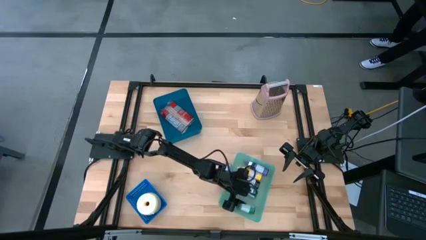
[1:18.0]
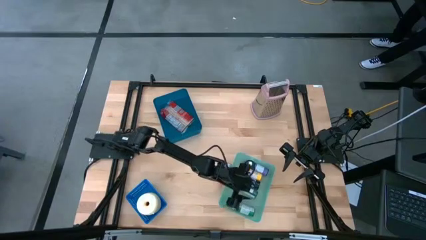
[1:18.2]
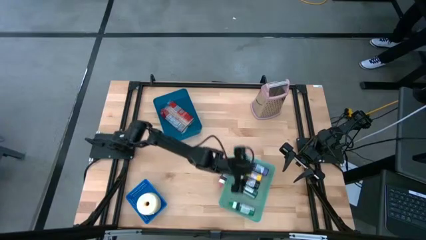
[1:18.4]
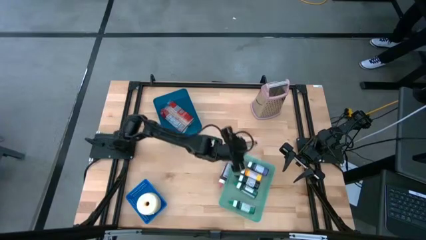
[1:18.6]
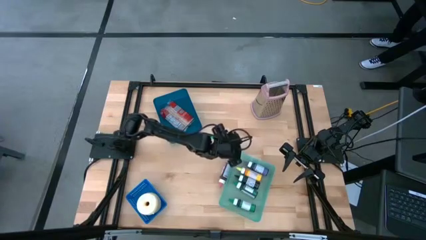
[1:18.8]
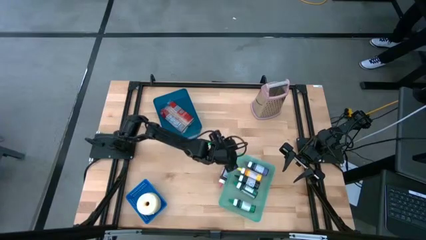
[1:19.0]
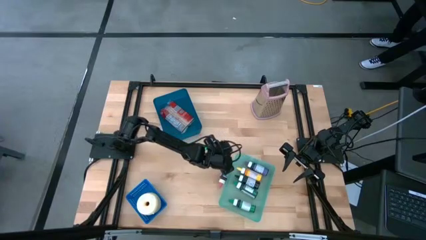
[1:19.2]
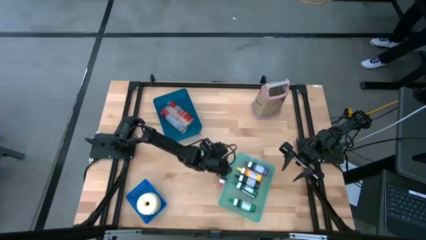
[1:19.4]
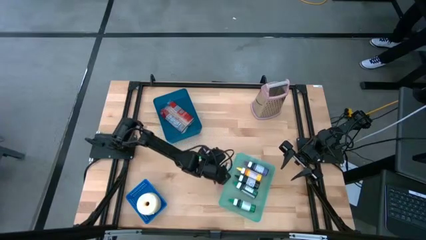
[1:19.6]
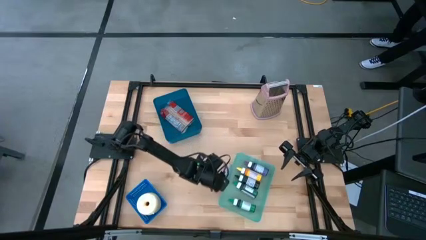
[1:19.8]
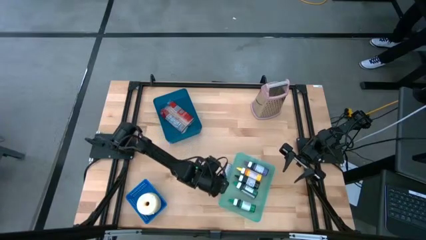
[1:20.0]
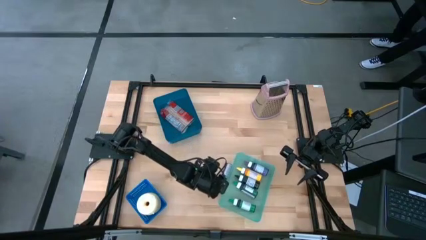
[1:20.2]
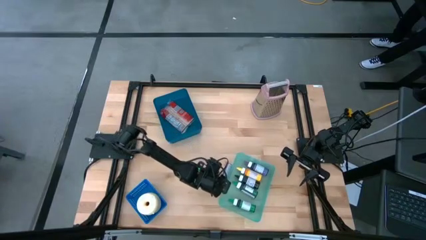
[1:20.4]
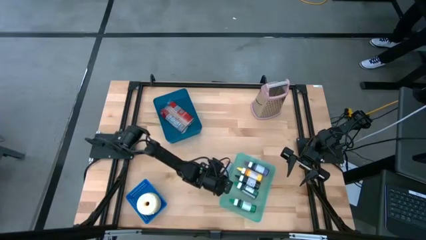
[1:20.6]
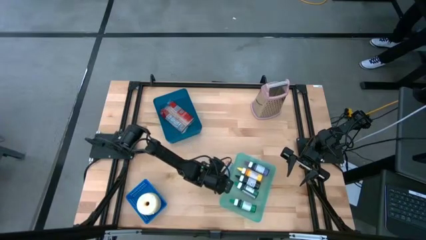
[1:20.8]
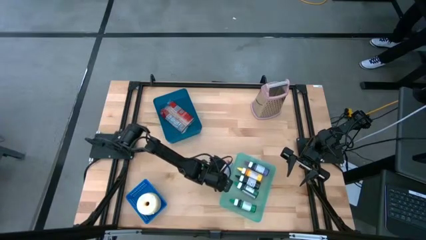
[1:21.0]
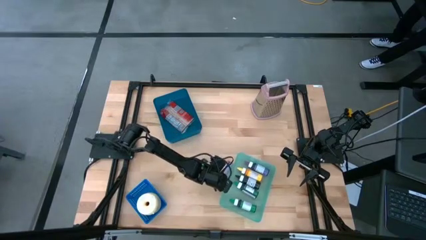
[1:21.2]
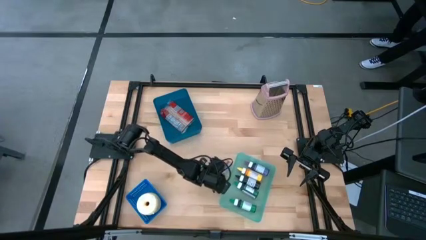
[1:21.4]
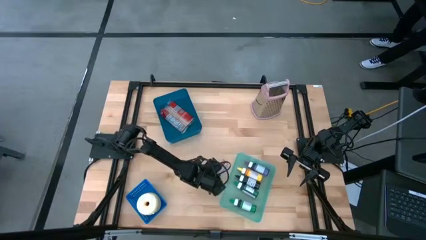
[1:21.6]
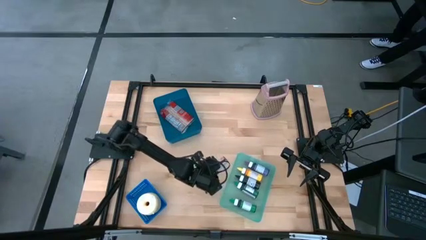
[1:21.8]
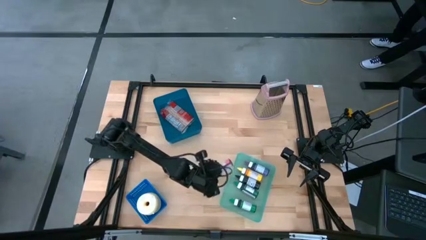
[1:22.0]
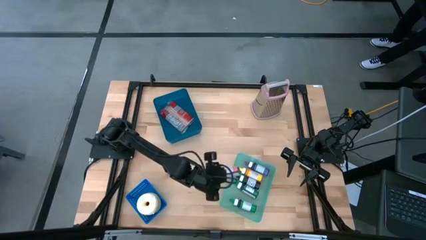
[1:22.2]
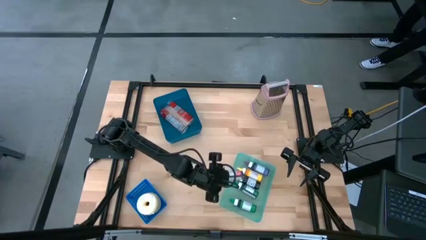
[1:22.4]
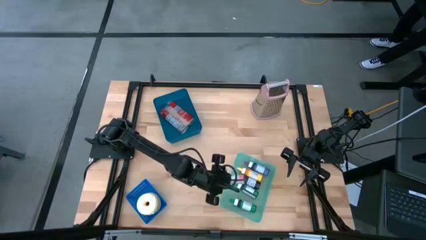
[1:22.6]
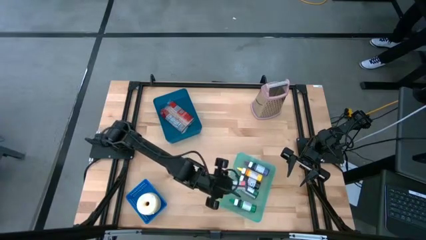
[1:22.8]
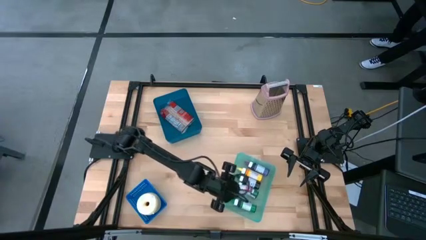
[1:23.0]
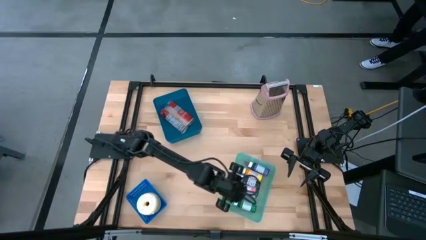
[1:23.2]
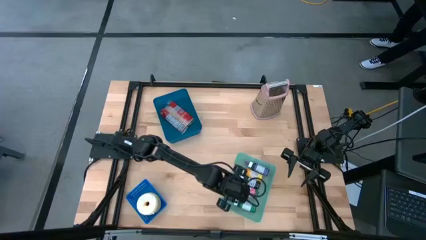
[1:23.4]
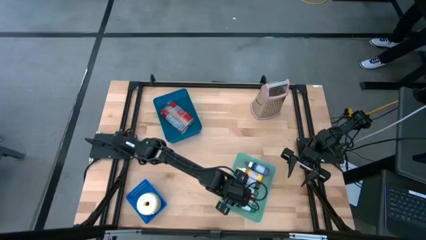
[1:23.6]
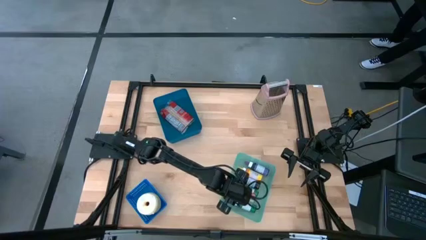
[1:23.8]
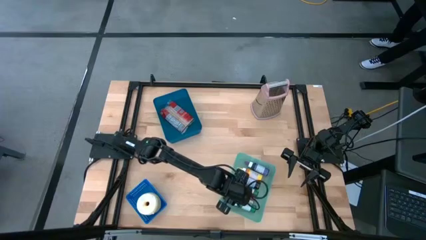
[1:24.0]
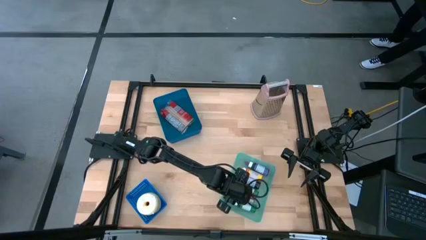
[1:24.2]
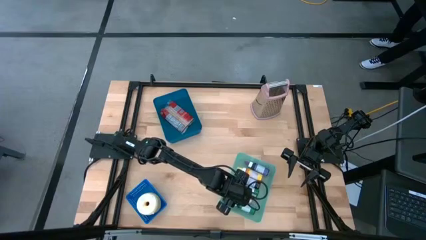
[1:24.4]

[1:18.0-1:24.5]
Put the pink food coloring bottle into the green bin

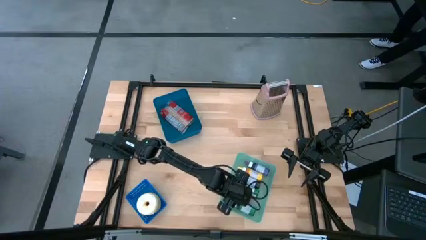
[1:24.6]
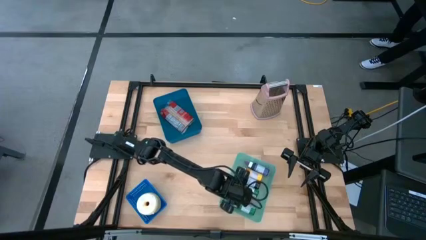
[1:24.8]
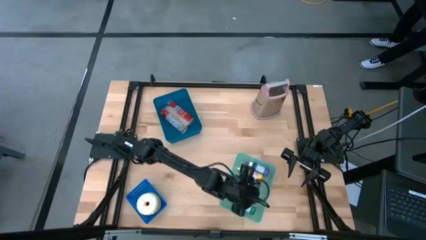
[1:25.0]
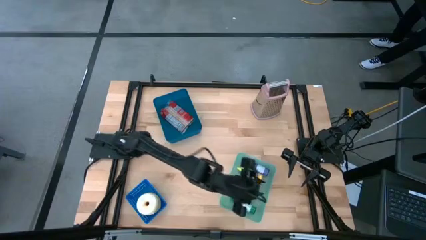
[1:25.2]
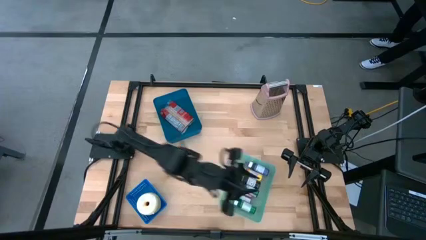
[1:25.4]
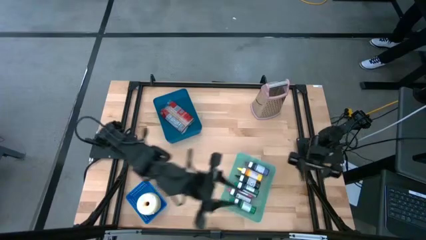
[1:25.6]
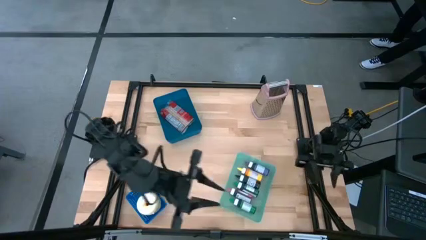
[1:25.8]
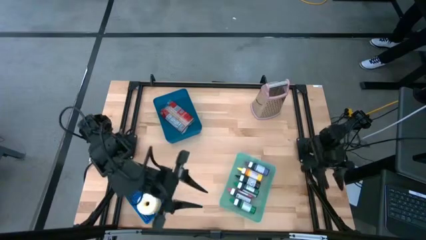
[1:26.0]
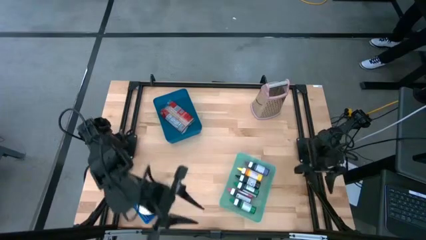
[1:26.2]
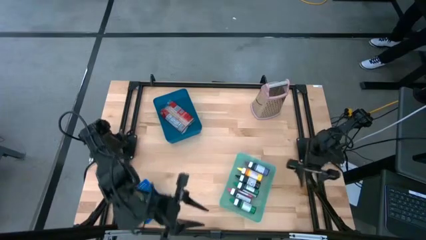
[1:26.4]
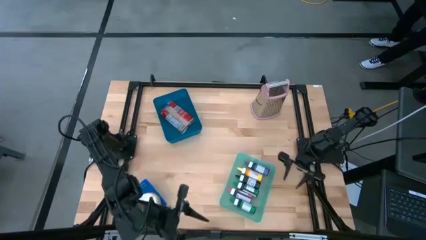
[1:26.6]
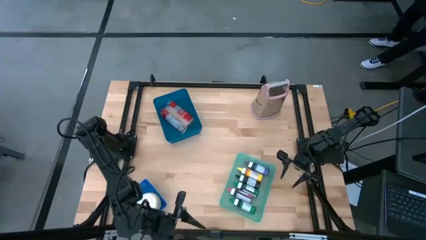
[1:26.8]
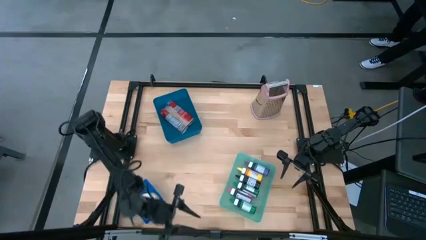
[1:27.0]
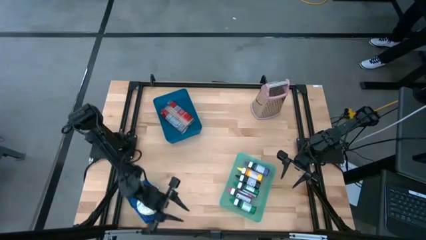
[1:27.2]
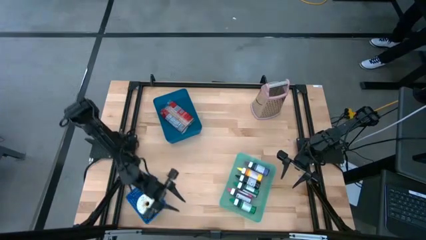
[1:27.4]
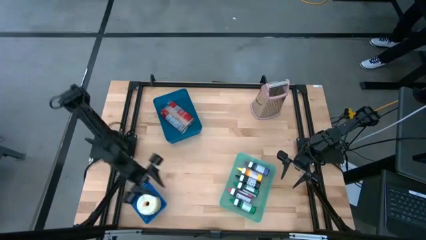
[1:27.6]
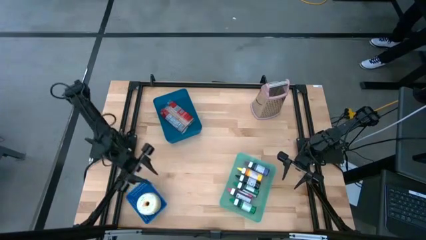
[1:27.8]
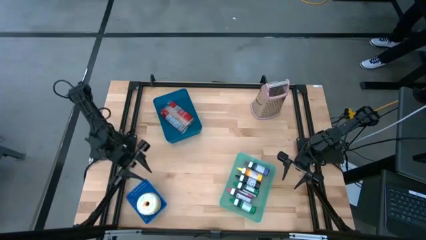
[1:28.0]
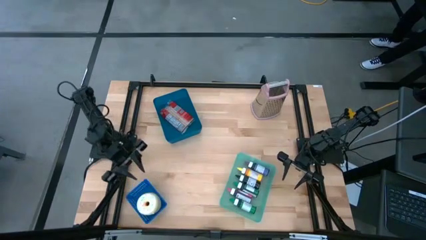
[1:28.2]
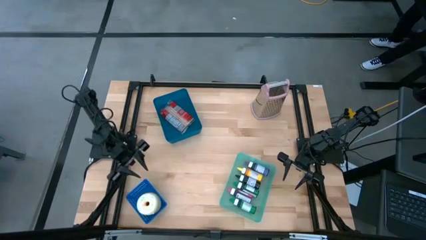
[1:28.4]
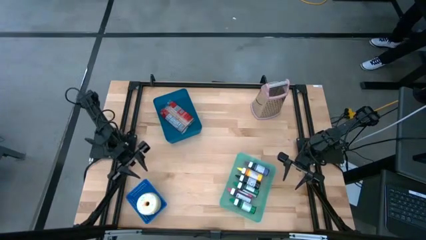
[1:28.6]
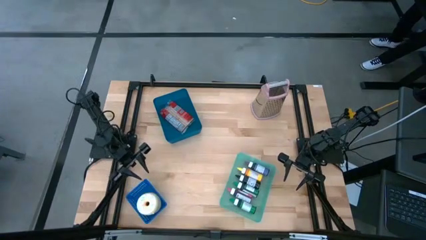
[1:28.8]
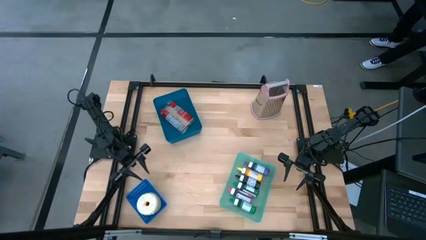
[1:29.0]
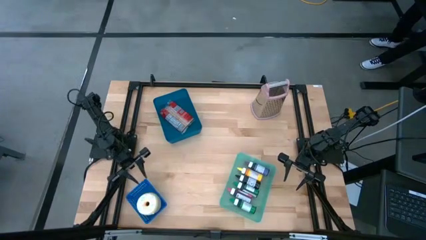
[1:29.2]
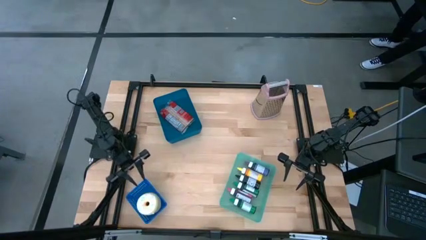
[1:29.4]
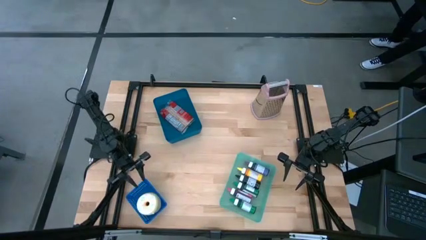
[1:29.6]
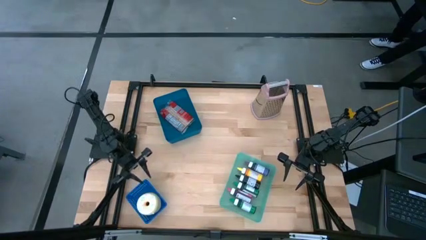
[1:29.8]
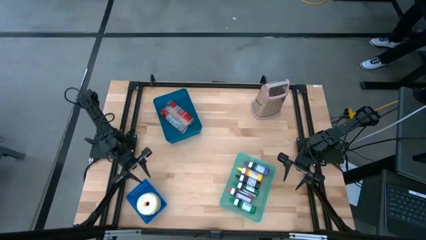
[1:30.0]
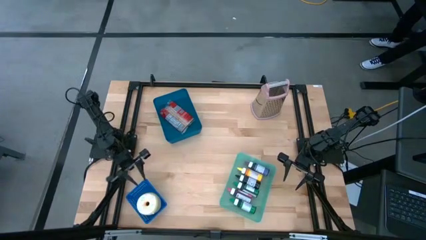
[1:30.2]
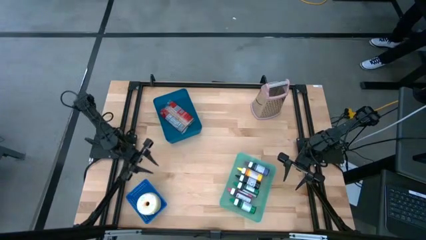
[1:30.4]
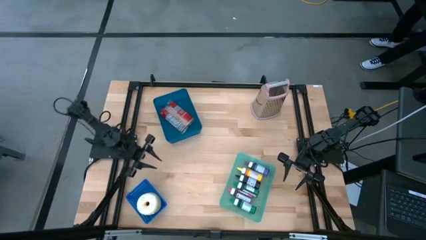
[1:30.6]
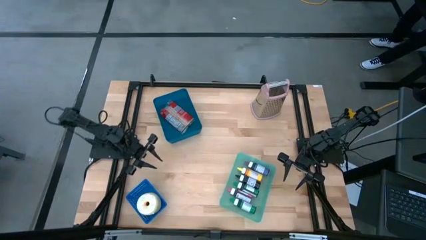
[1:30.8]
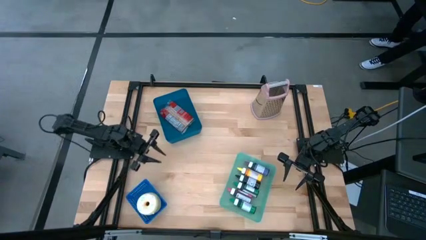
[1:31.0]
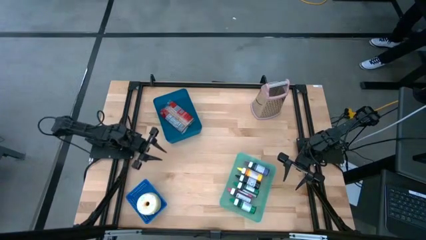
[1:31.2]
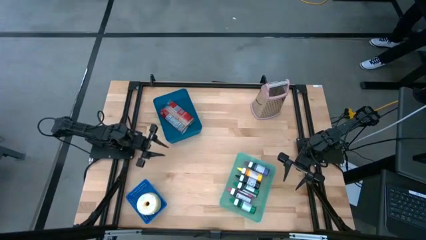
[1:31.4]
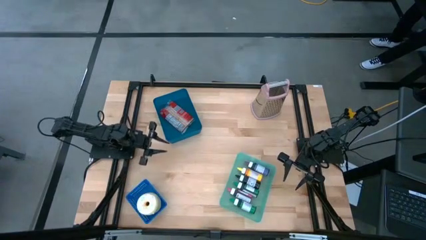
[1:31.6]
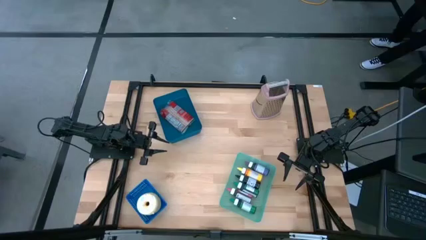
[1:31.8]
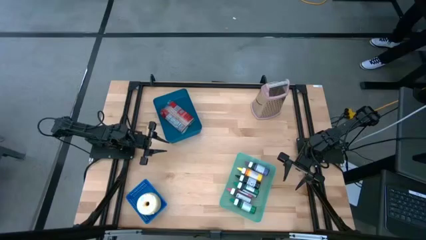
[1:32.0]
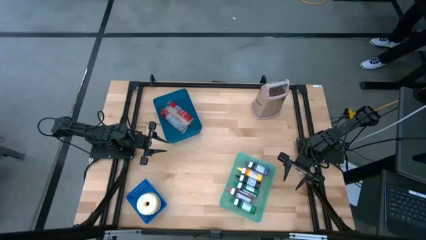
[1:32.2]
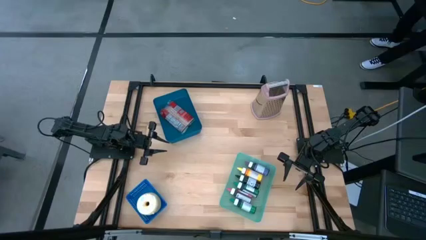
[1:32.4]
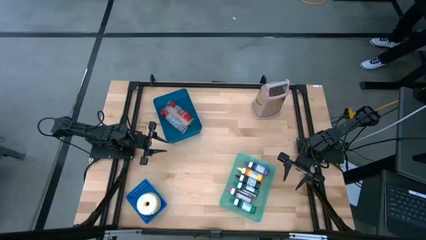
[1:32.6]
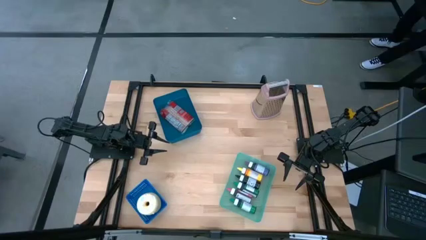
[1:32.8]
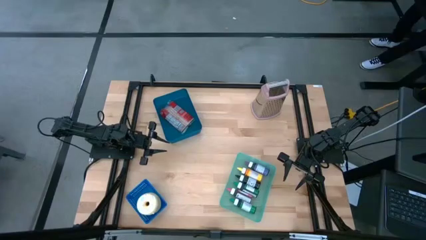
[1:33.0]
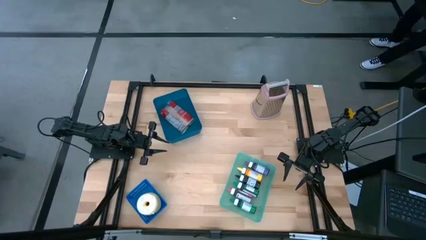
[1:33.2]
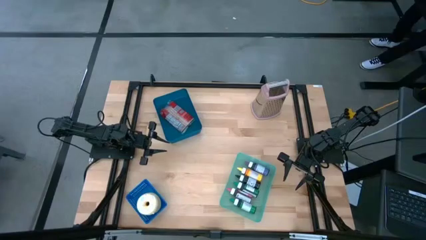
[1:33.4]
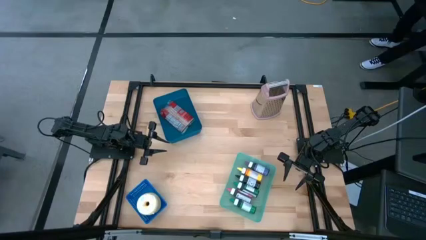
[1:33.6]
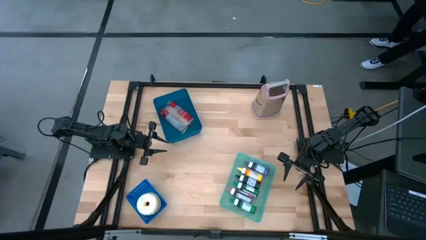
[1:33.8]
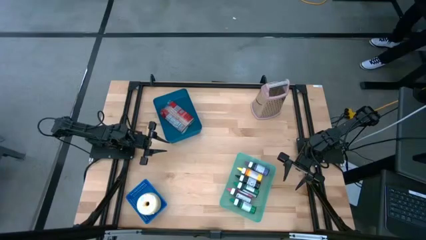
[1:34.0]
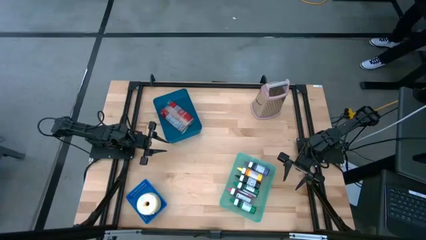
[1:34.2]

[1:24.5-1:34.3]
Return to Home Position
